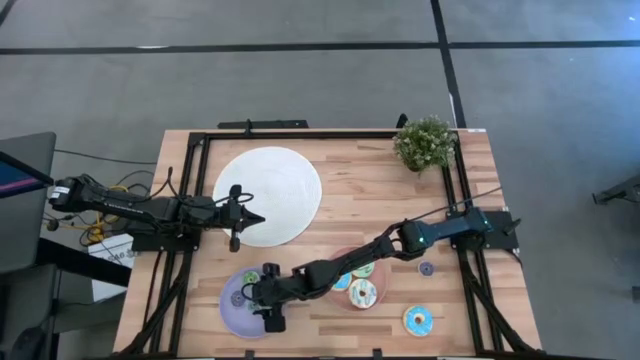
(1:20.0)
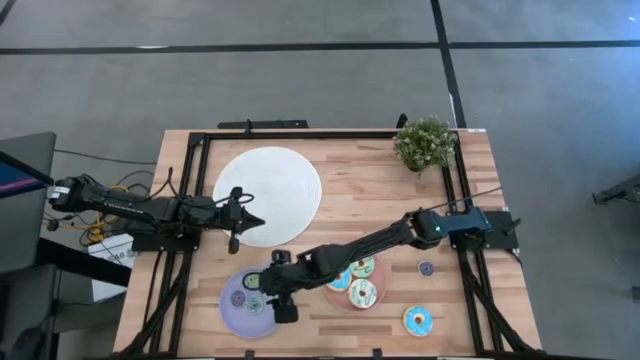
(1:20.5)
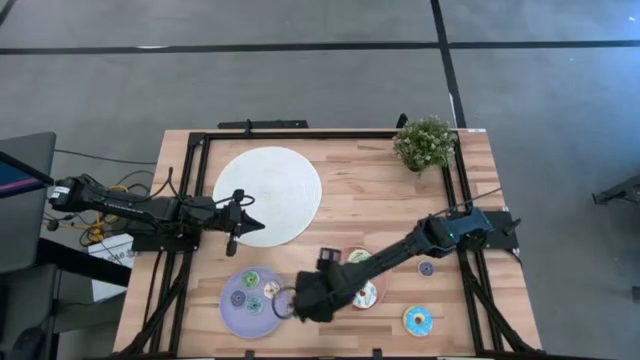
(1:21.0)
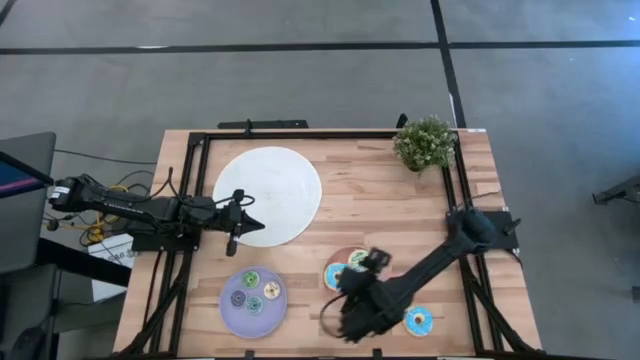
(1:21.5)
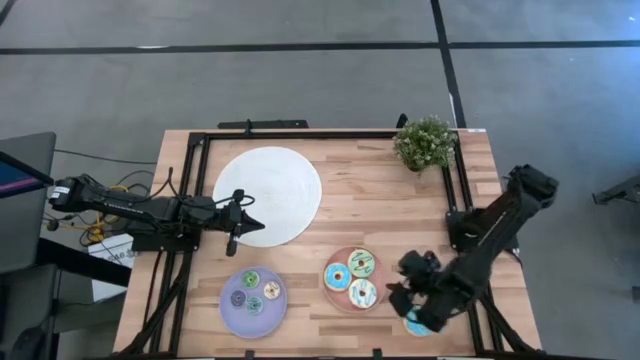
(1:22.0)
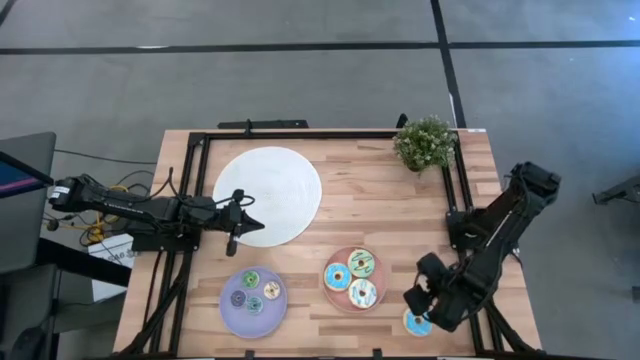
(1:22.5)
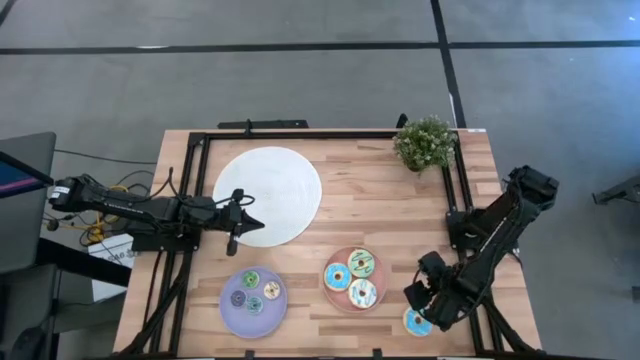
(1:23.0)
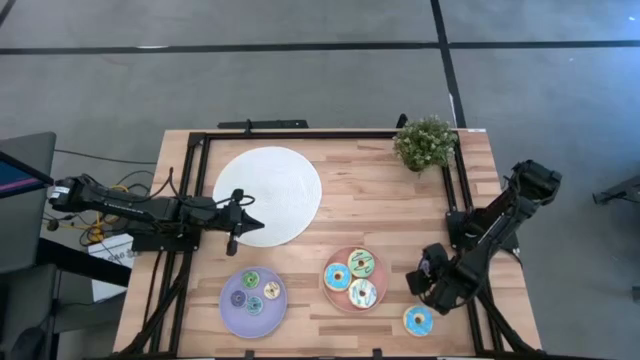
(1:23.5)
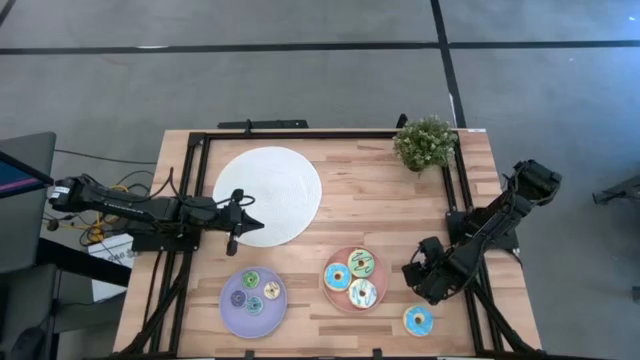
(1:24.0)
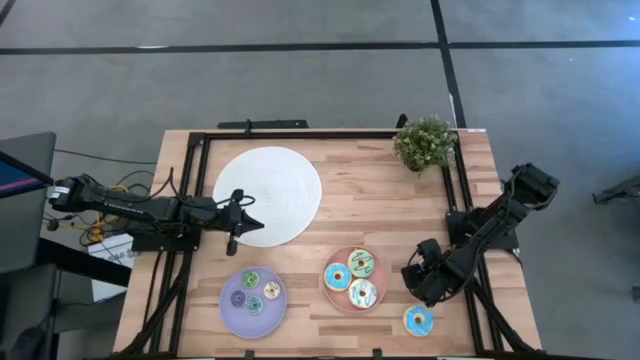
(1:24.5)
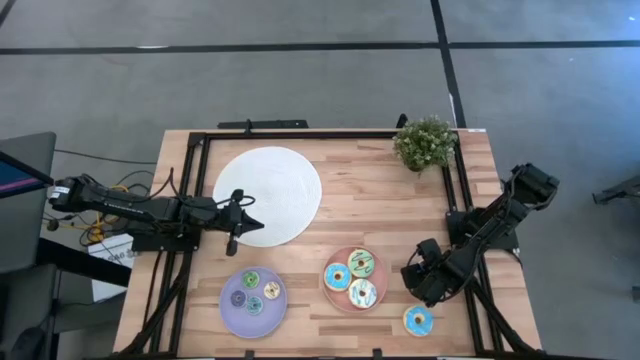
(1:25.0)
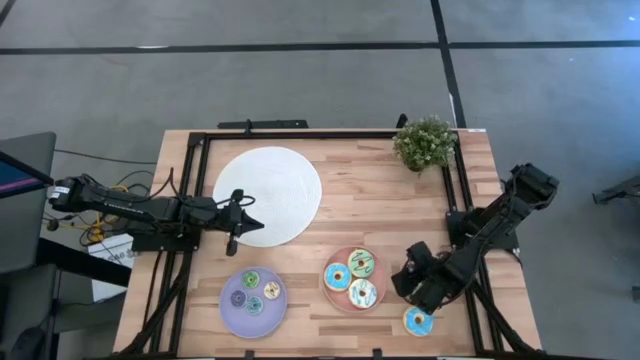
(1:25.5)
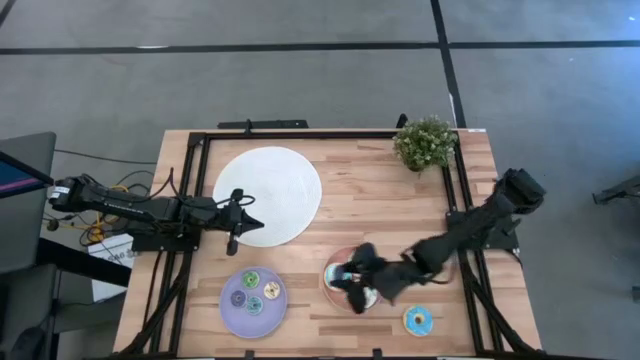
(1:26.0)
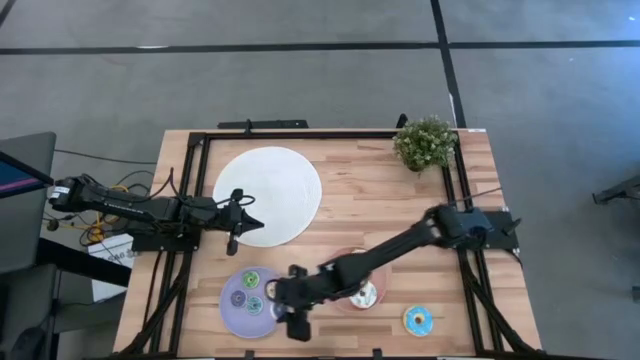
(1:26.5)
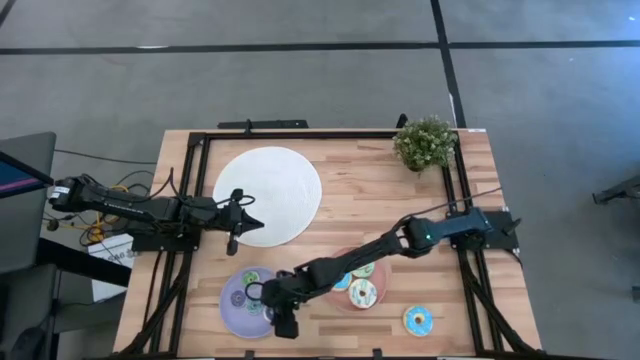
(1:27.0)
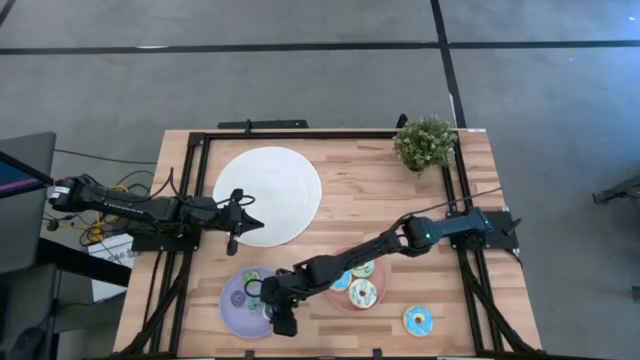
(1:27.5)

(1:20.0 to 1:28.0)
Task: Pick & Place donuts
Put the small blue donut on the purple plate

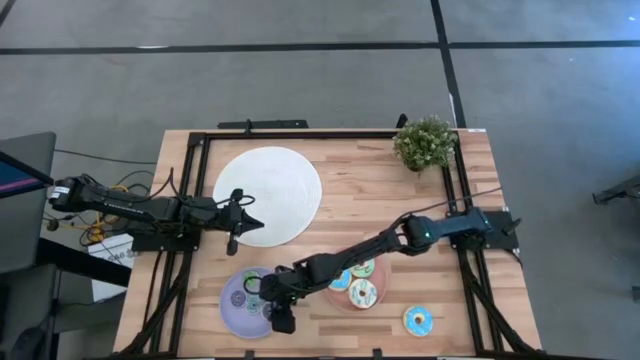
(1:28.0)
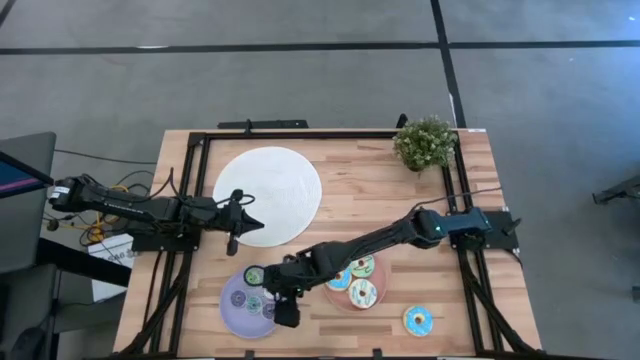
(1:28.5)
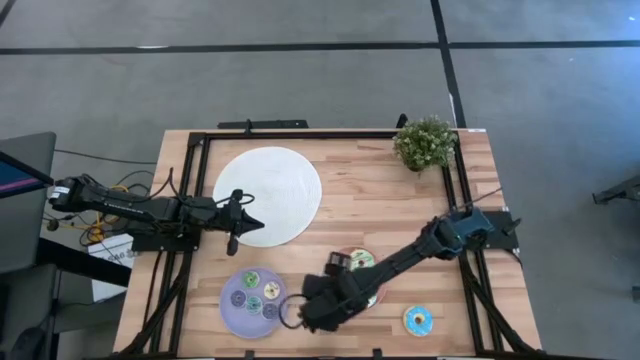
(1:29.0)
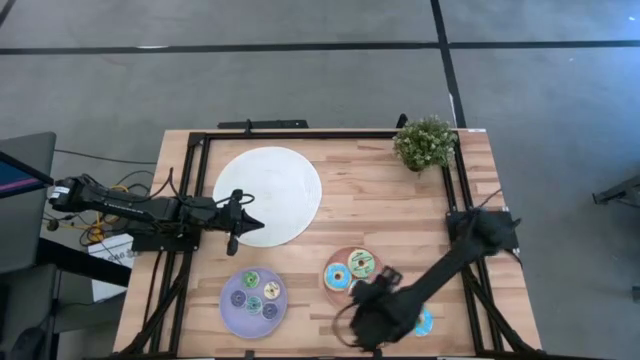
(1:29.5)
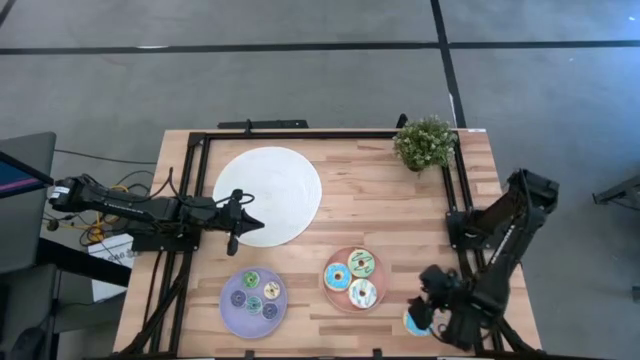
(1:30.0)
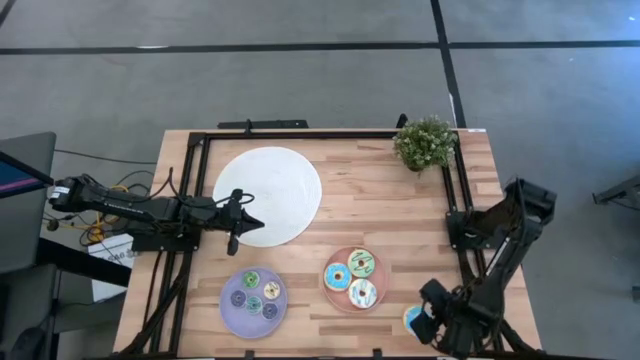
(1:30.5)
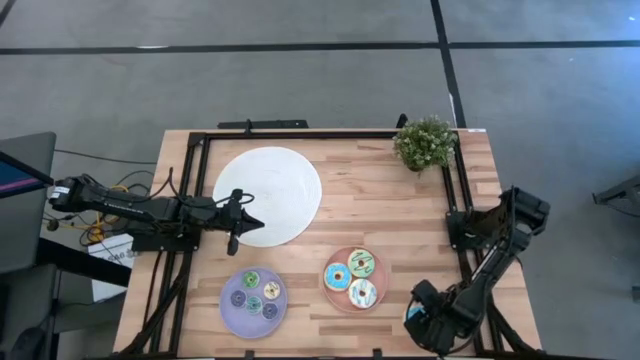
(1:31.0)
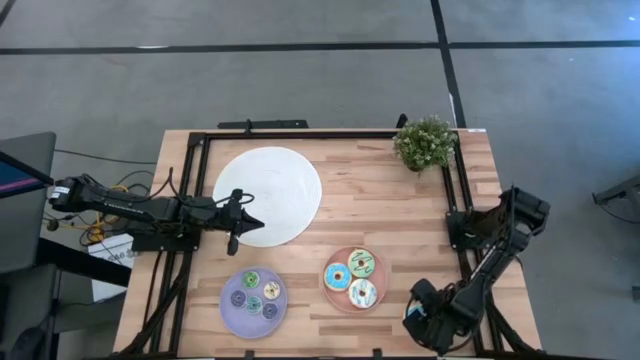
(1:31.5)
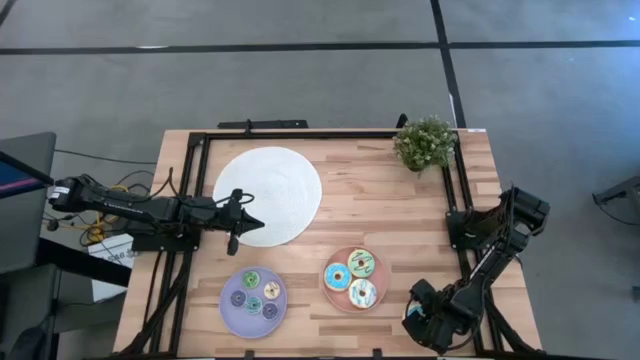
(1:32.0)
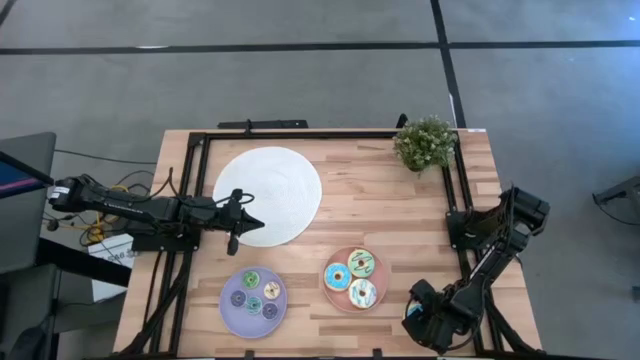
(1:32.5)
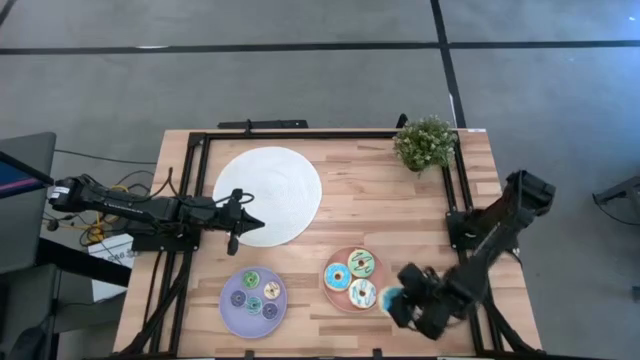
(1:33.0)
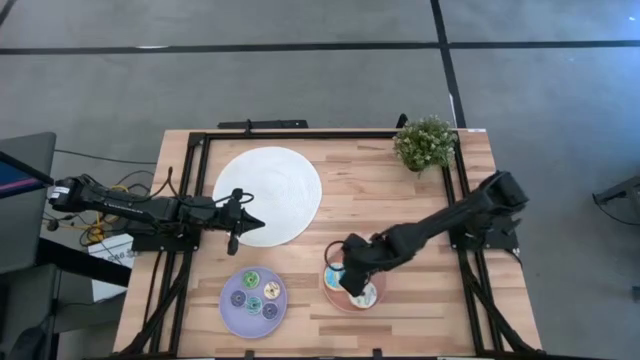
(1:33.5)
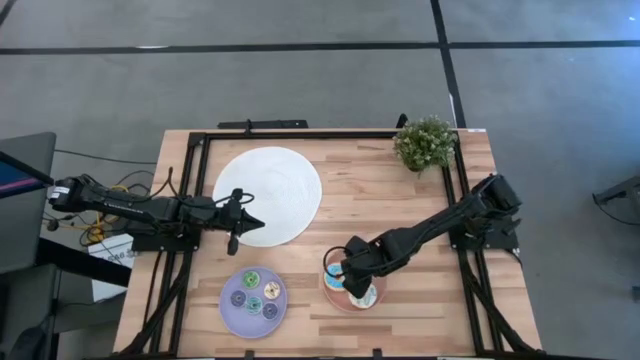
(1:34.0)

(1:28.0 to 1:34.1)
Put the large blue donut on the pink plate

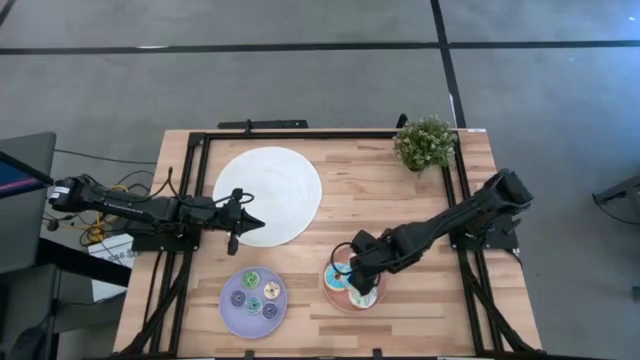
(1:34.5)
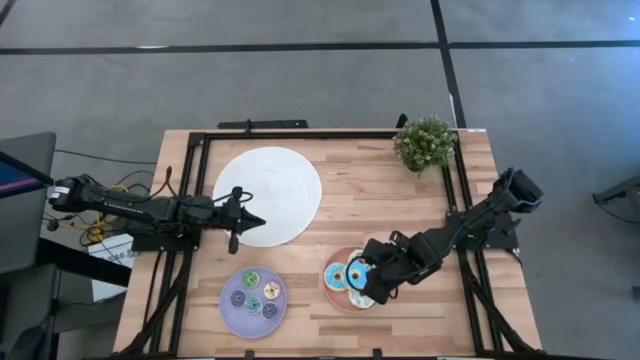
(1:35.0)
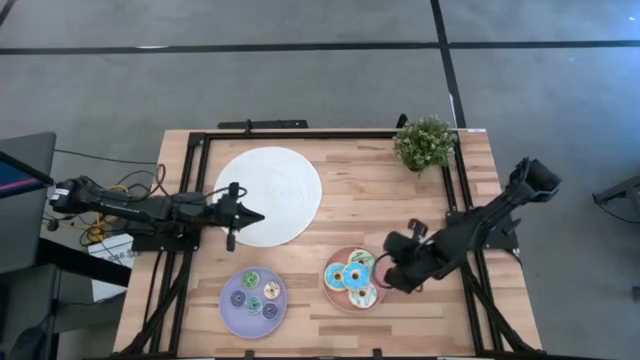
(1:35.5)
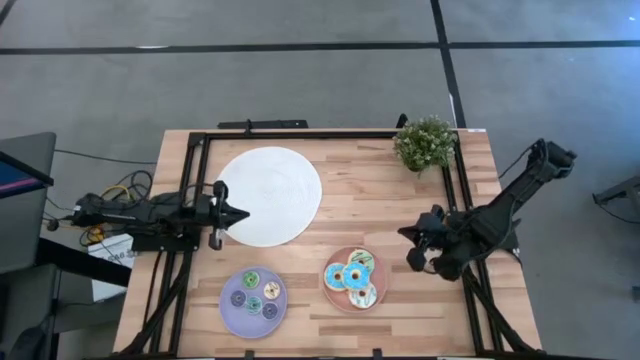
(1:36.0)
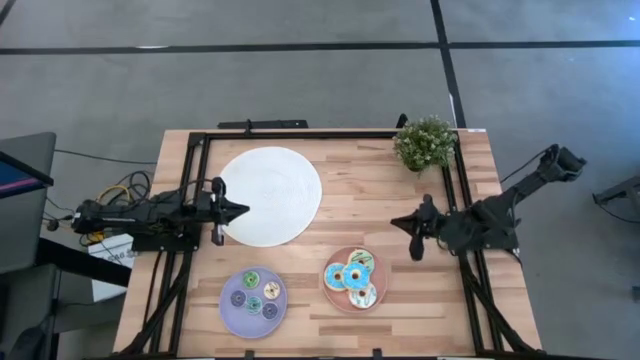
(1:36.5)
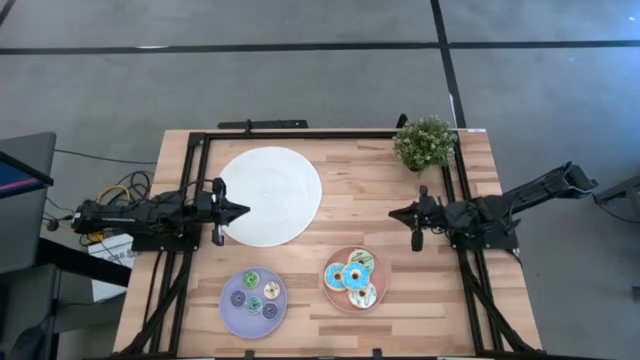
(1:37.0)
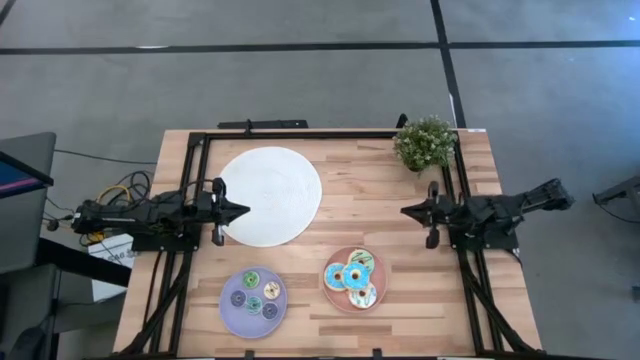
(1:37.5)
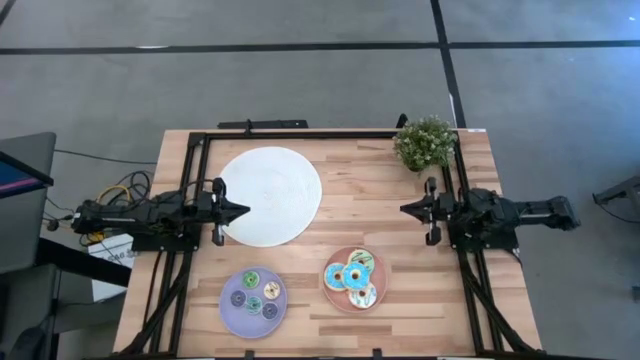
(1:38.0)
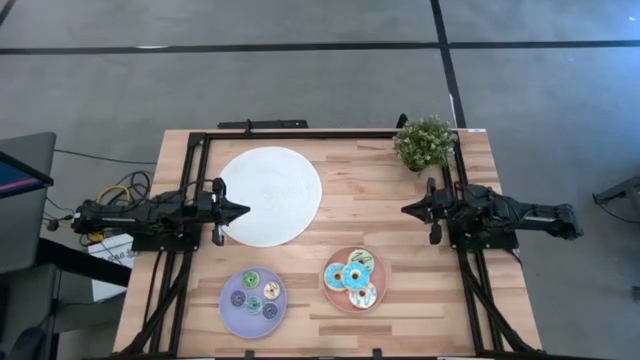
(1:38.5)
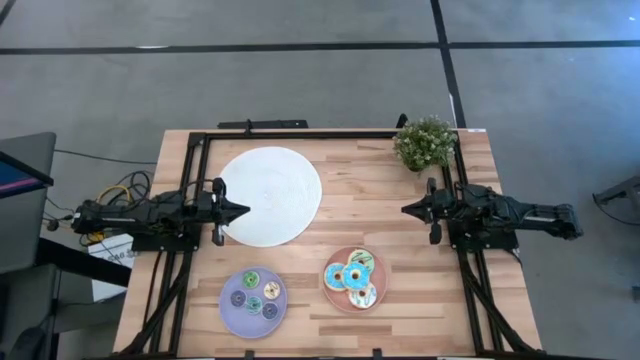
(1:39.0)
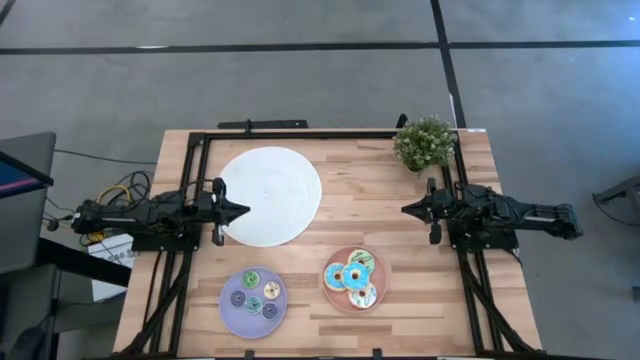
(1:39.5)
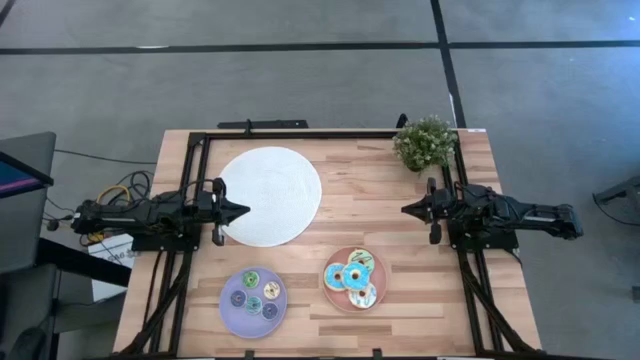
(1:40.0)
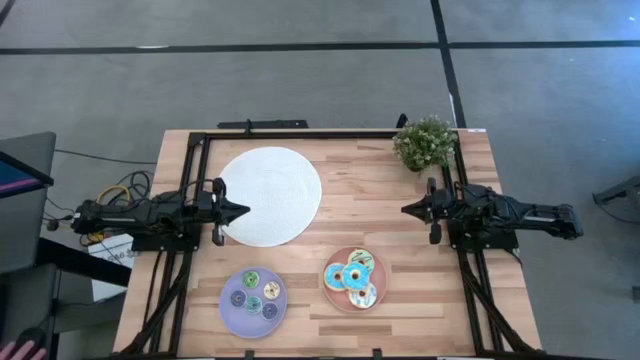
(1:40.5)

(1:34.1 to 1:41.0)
Return to Home Position
